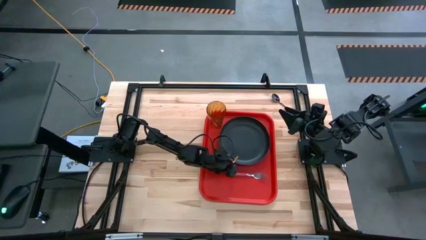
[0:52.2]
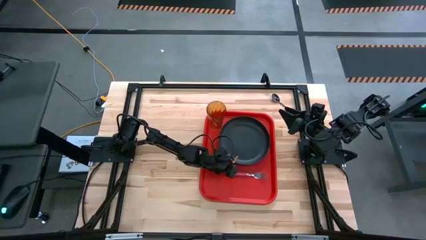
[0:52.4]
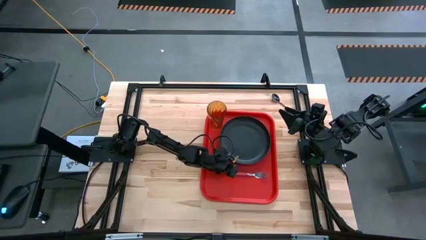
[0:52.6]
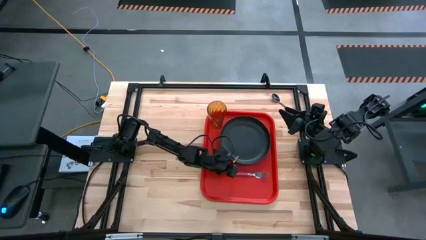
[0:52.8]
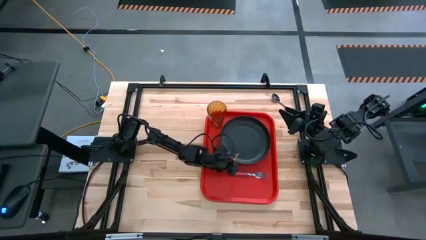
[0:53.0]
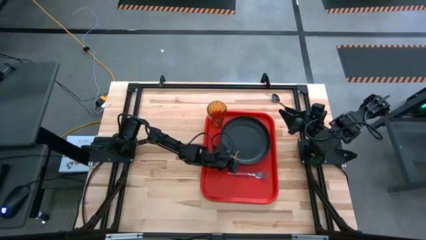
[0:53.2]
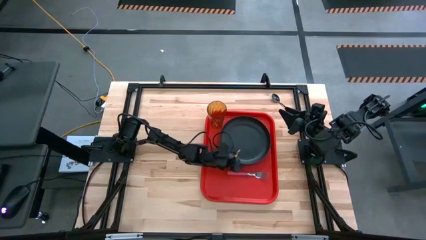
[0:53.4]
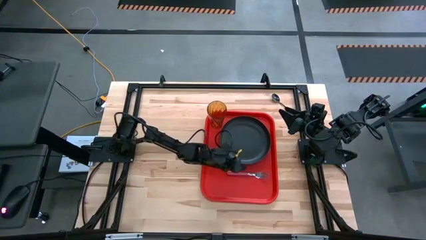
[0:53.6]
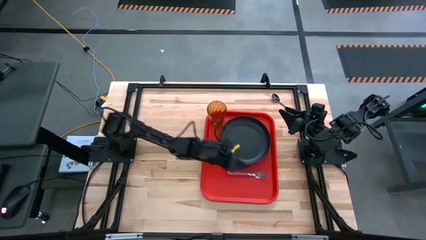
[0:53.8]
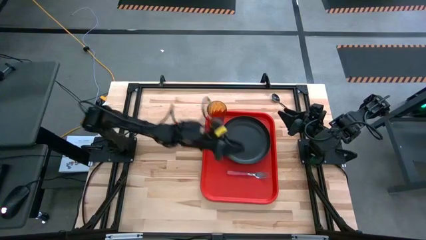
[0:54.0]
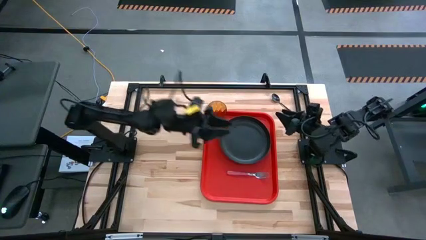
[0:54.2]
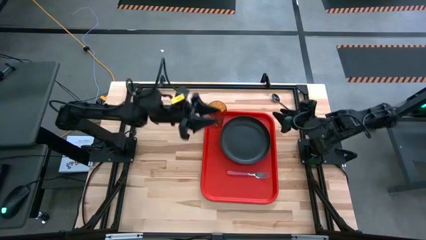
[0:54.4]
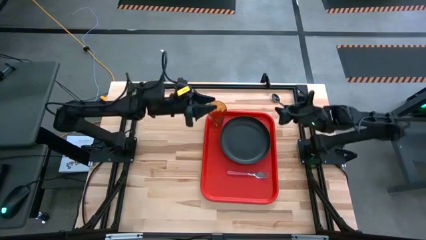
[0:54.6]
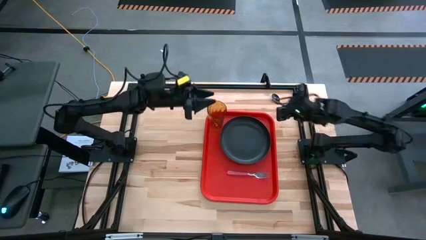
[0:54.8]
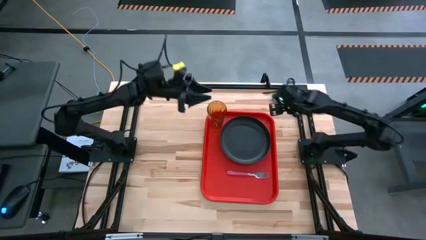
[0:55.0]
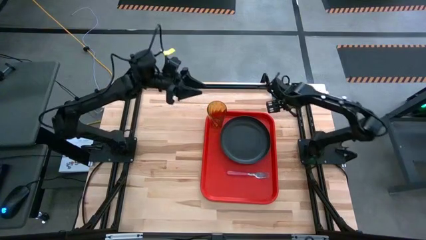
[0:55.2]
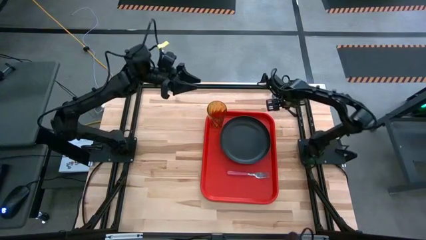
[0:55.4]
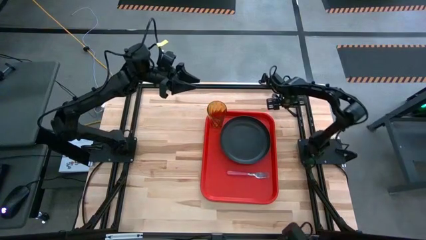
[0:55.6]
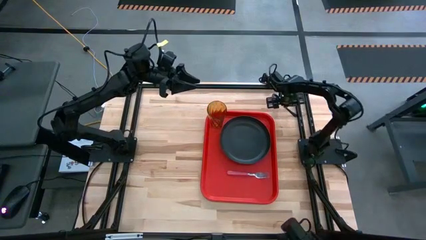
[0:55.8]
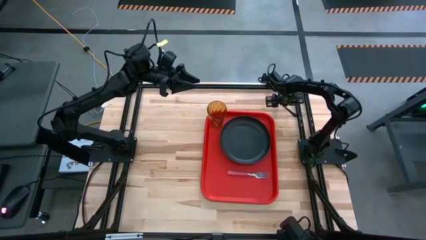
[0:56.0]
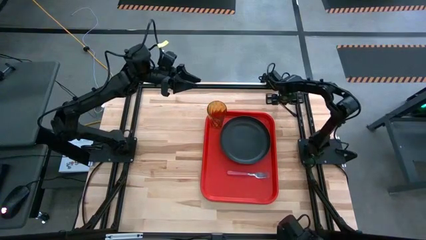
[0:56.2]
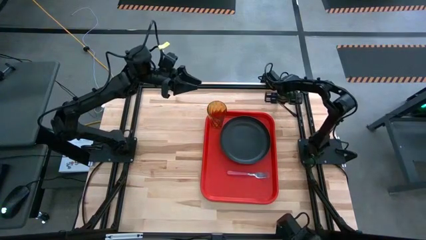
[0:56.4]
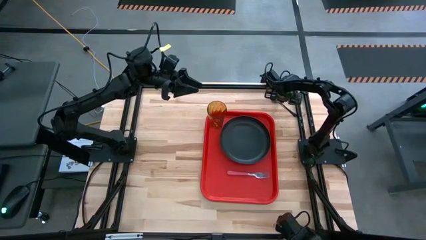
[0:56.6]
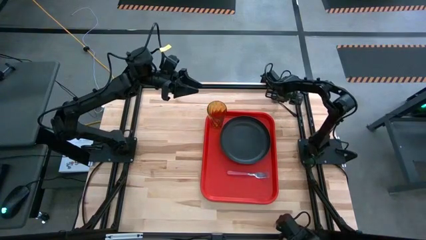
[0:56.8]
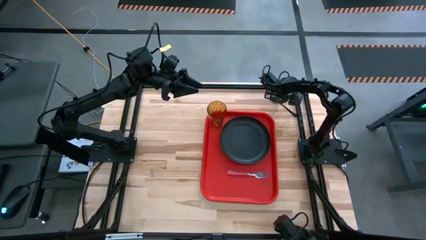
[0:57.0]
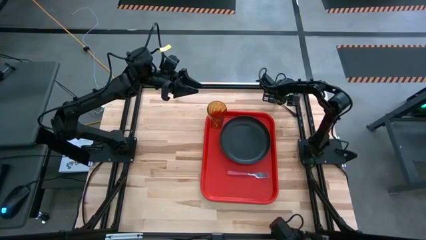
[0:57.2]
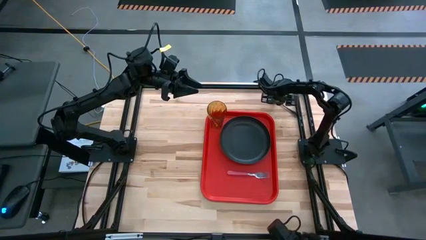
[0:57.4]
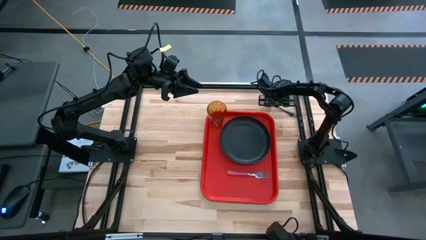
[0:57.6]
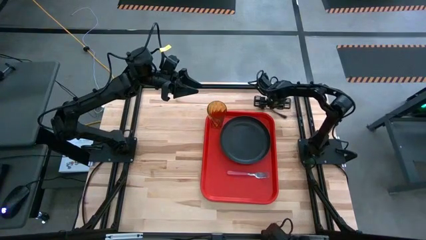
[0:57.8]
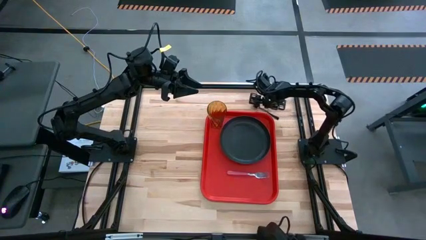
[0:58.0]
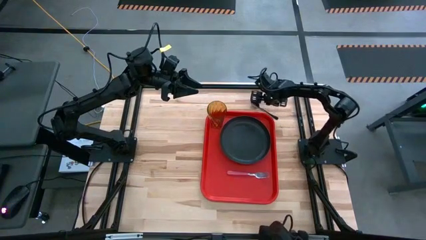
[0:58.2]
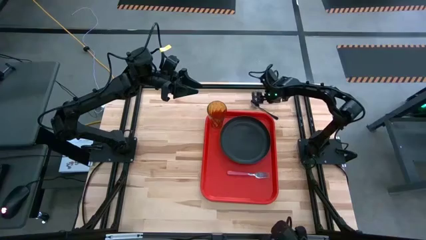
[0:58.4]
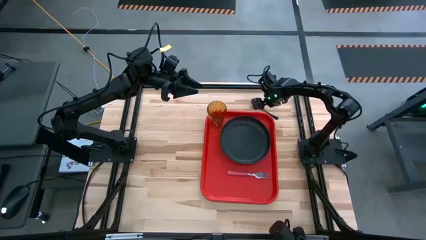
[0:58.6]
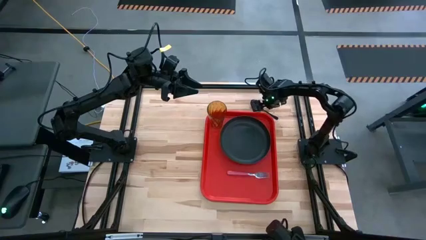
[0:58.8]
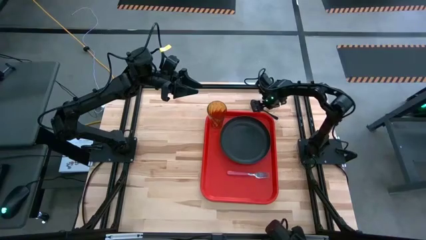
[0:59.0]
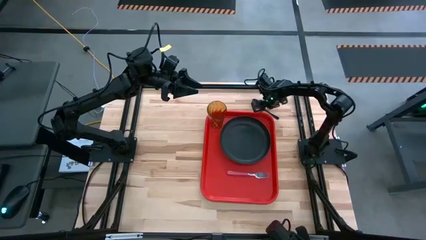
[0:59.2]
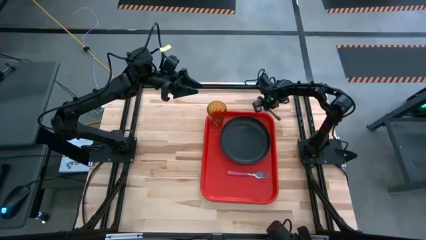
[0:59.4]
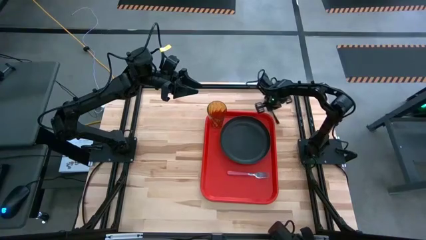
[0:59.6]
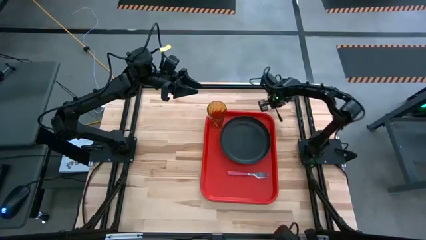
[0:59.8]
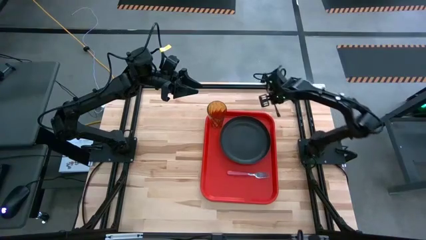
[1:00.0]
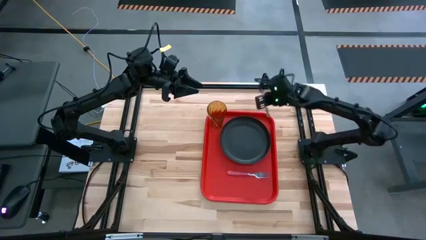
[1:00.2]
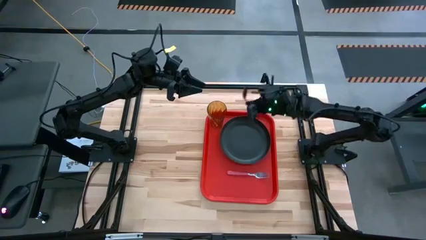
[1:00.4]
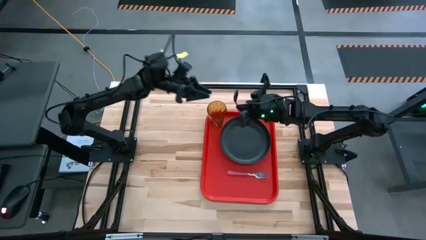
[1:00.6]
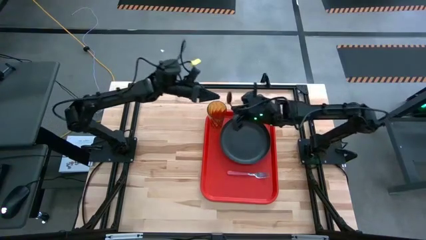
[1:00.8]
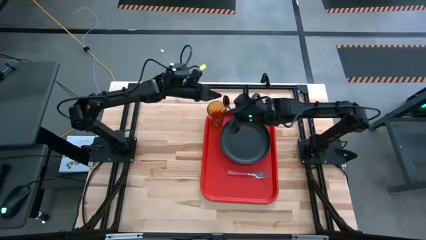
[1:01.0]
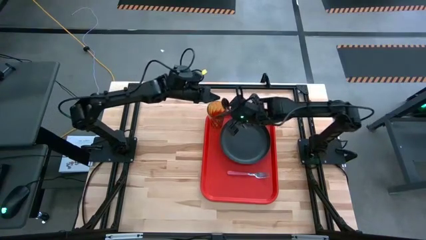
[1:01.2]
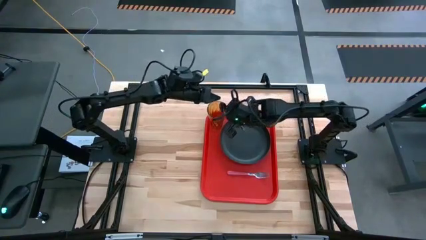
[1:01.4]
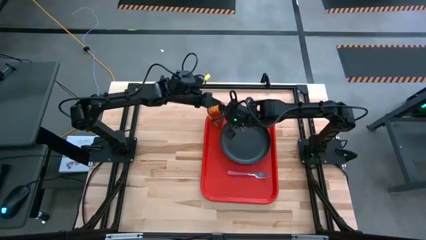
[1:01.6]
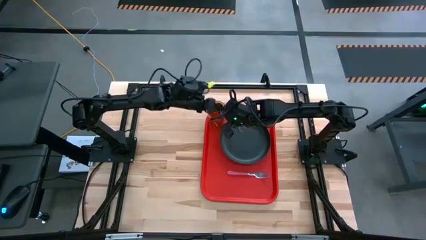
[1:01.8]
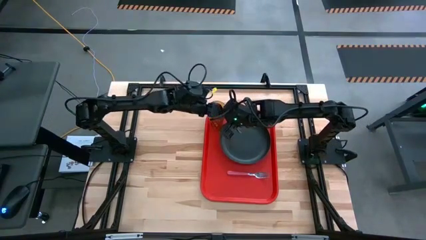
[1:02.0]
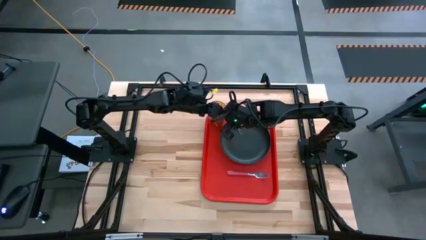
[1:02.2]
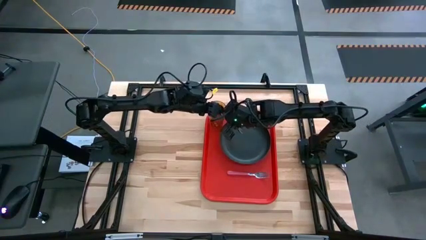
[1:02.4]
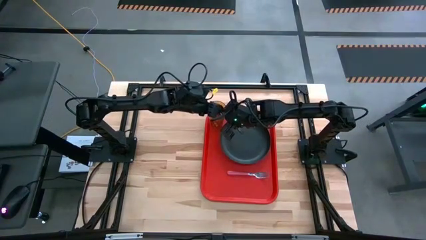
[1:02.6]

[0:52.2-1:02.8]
Task: Pick and place plate/cup/fork/spoon on tray
Put the black spoon on the red tray to the bottom of the pink fork

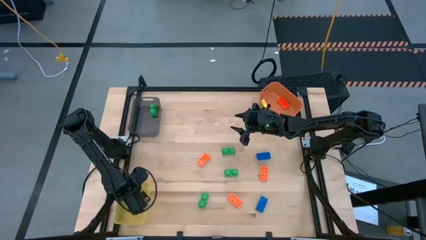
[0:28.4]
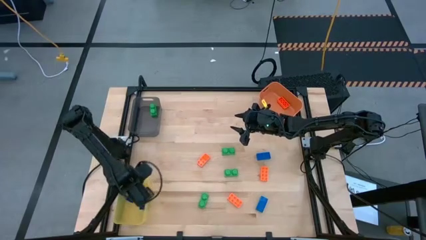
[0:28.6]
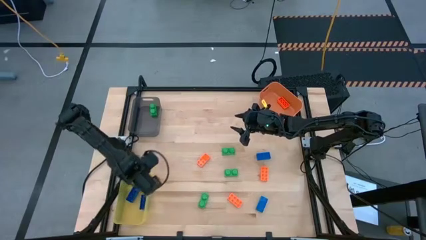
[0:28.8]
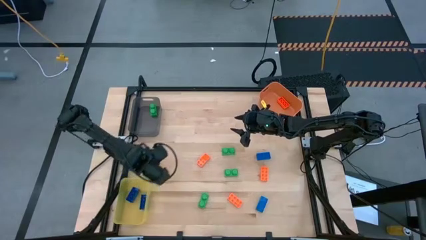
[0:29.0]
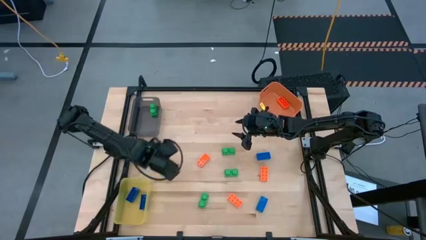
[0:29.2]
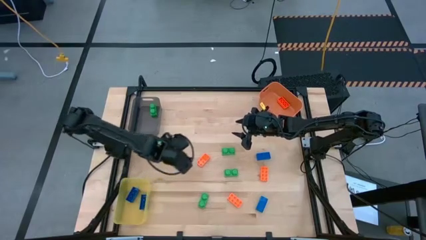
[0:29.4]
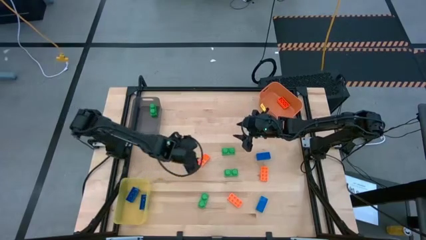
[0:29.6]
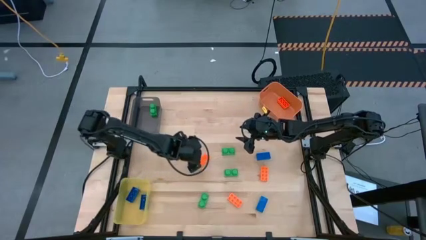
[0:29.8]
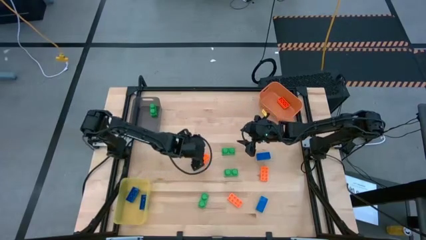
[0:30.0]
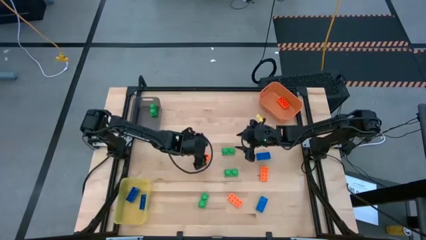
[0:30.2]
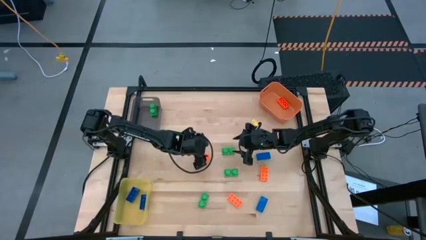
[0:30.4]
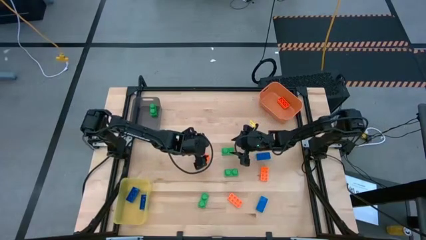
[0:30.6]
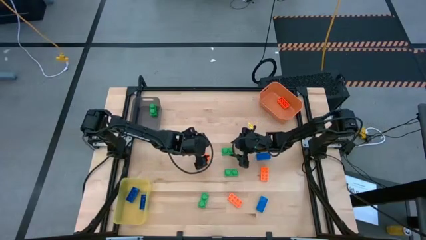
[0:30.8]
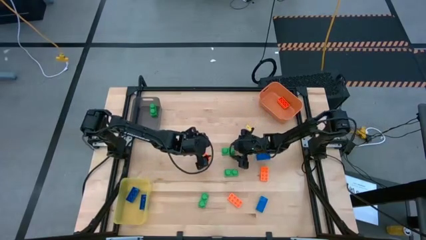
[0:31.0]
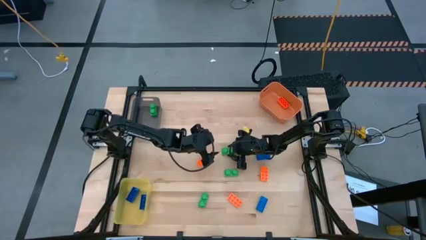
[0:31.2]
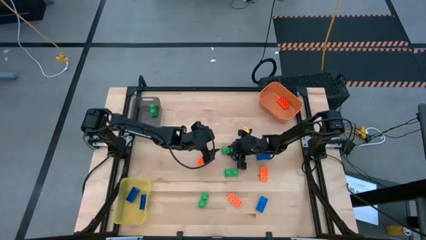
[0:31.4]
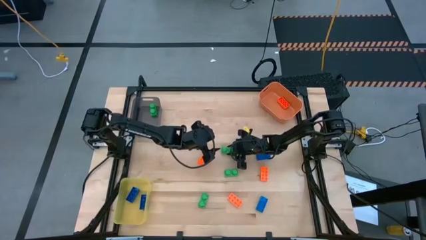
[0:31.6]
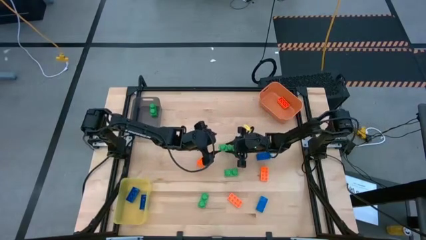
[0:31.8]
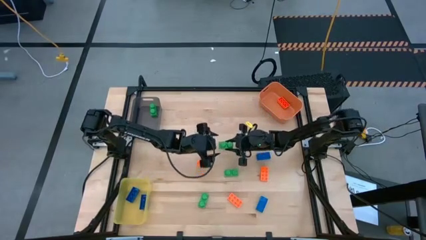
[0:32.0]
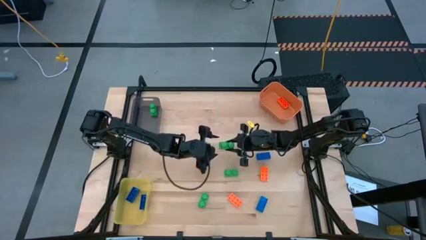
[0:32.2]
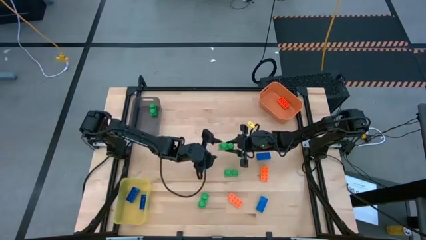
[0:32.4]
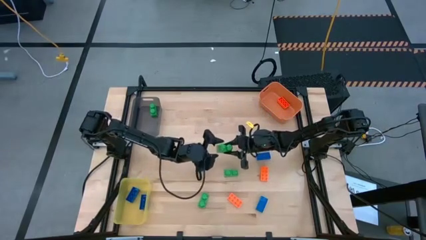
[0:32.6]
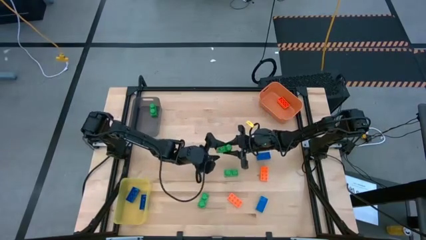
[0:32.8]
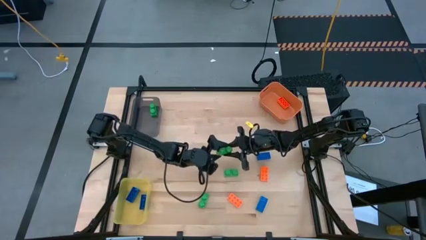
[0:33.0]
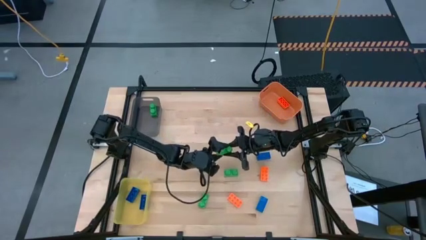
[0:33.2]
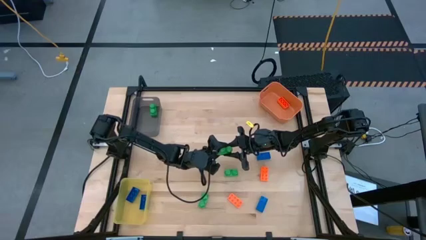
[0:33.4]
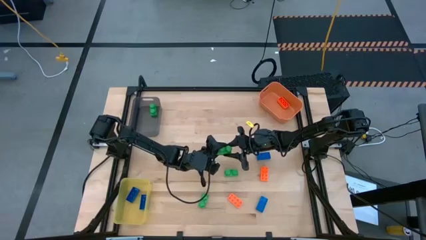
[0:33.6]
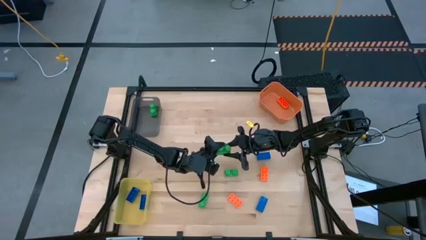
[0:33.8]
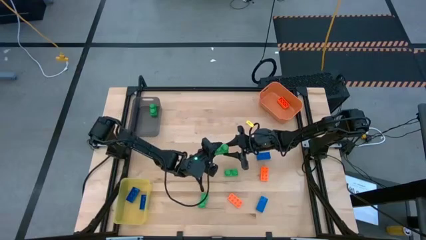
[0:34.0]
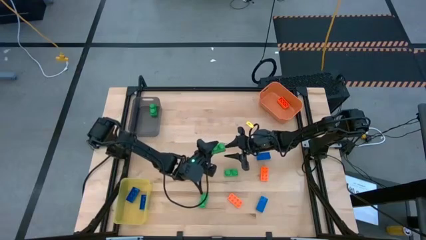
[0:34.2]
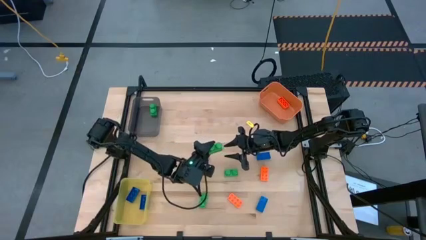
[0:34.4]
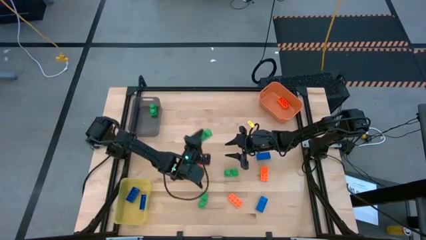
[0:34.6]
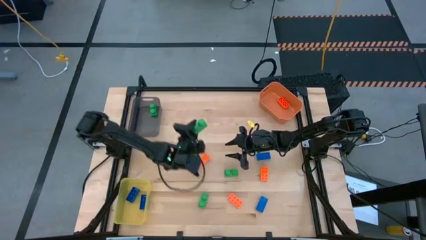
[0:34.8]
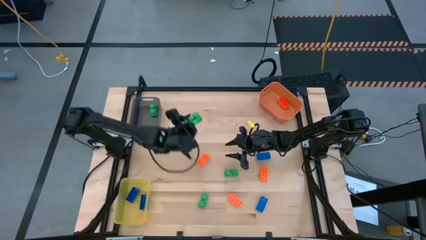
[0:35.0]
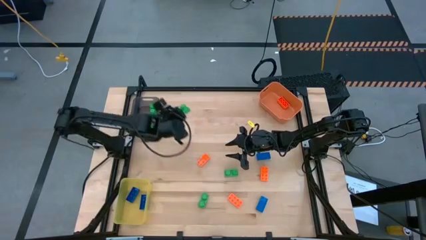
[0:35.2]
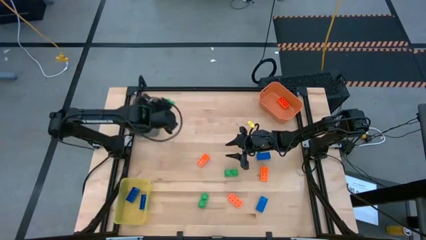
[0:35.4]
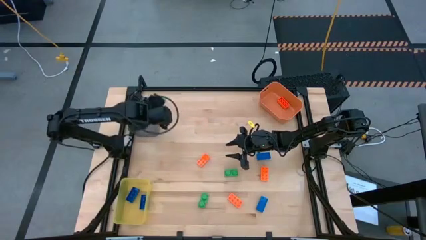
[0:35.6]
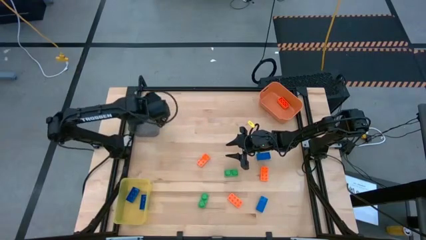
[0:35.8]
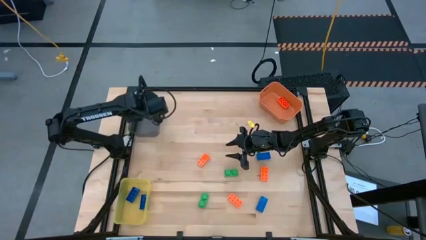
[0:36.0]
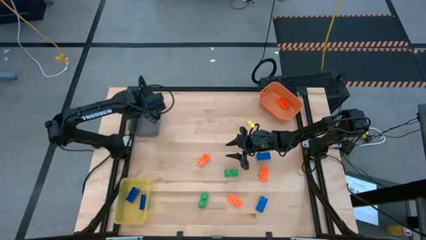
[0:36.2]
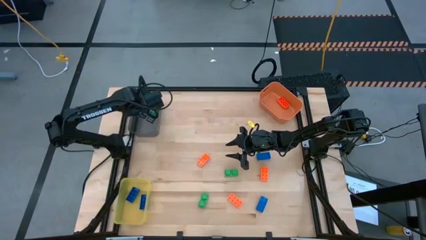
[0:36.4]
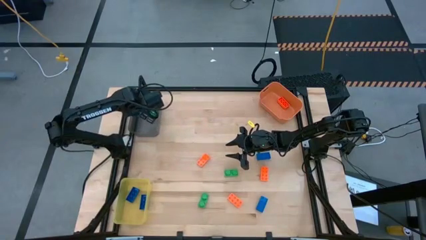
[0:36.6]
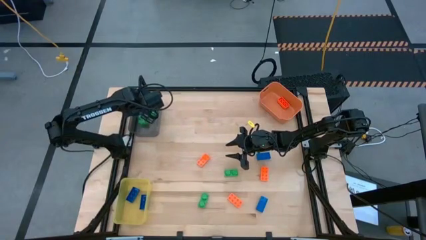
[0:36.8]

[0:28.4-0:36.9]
Task: Sort & place blocks by color
Put the green game piece into the black bin
